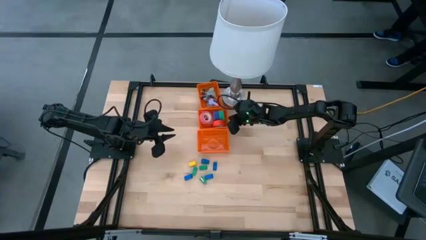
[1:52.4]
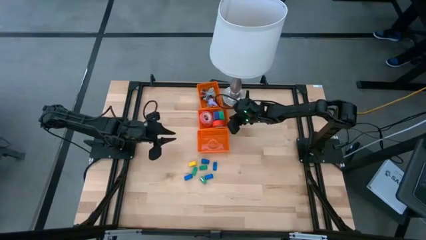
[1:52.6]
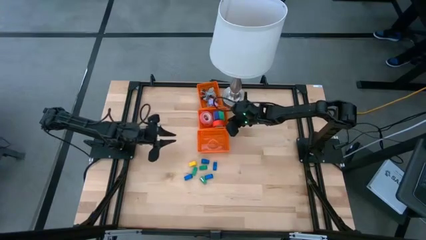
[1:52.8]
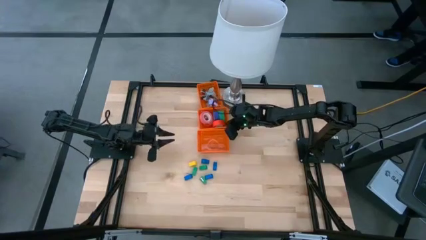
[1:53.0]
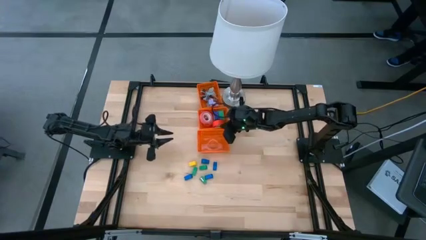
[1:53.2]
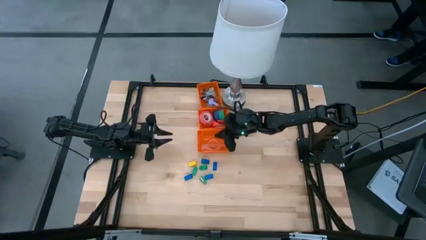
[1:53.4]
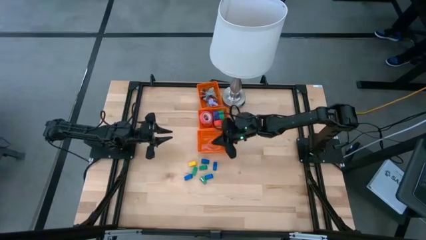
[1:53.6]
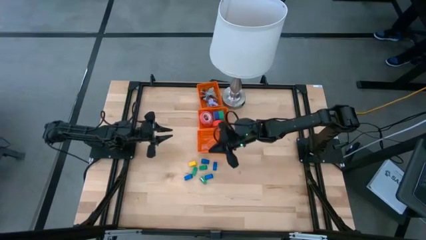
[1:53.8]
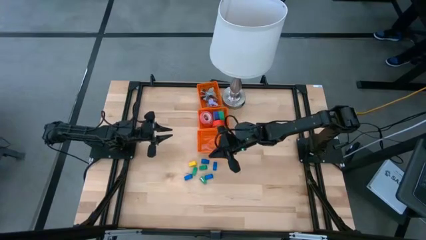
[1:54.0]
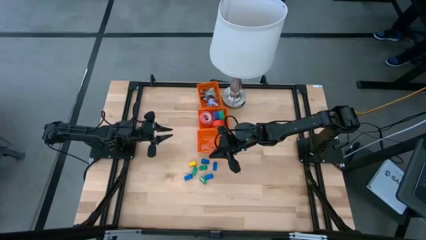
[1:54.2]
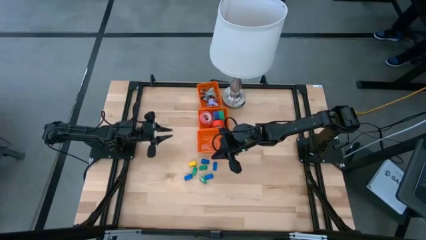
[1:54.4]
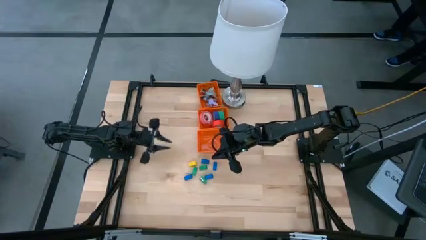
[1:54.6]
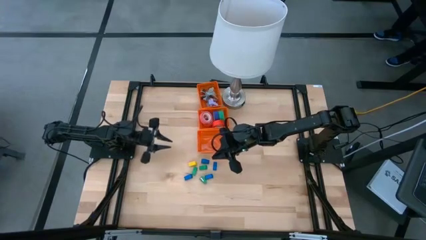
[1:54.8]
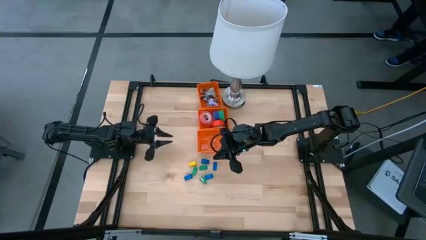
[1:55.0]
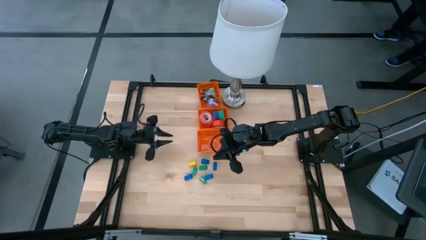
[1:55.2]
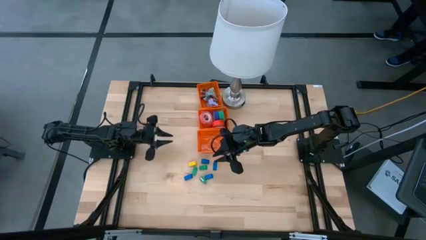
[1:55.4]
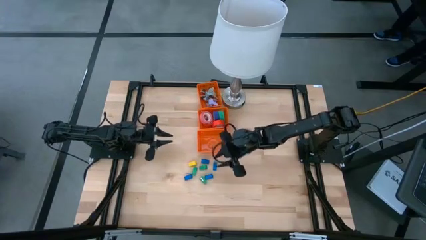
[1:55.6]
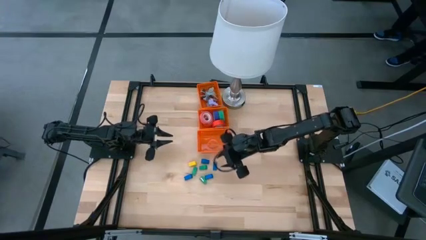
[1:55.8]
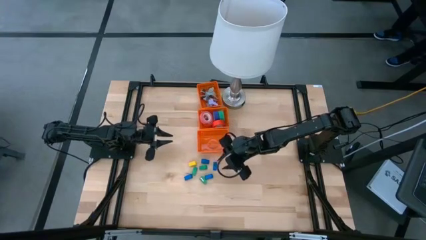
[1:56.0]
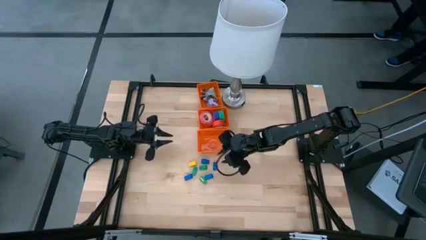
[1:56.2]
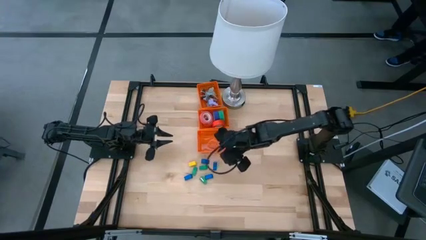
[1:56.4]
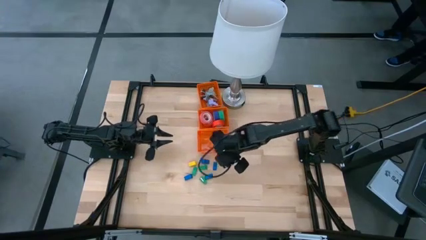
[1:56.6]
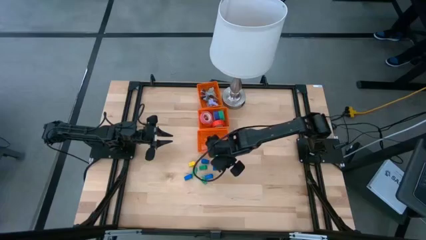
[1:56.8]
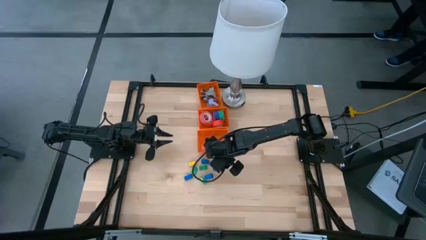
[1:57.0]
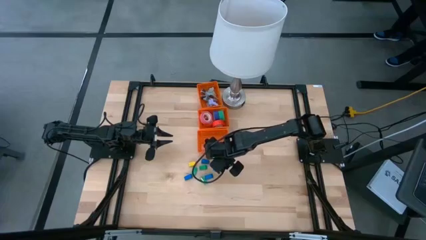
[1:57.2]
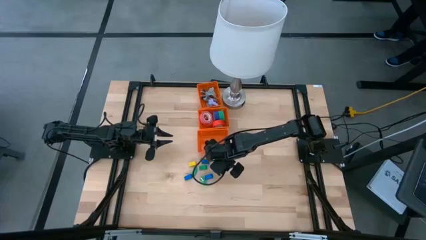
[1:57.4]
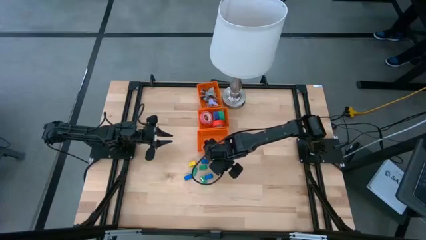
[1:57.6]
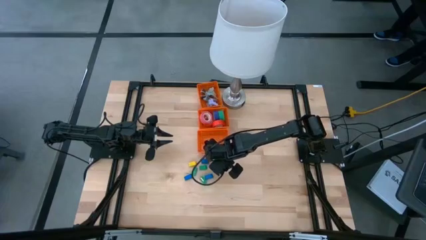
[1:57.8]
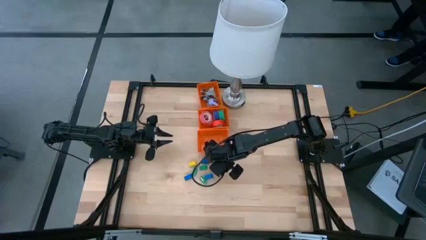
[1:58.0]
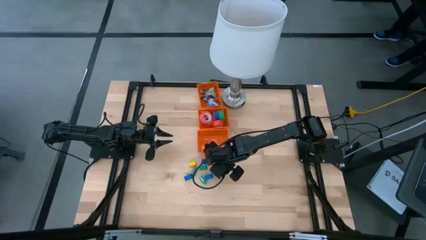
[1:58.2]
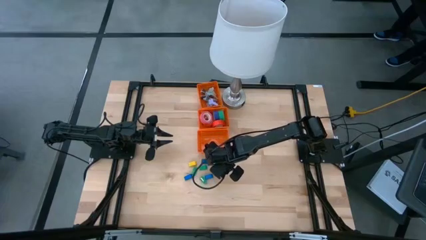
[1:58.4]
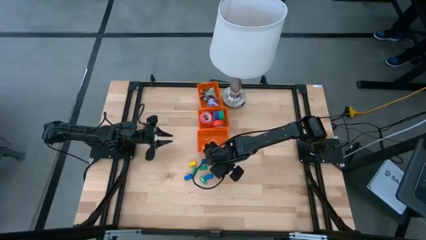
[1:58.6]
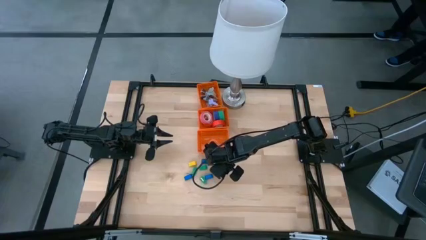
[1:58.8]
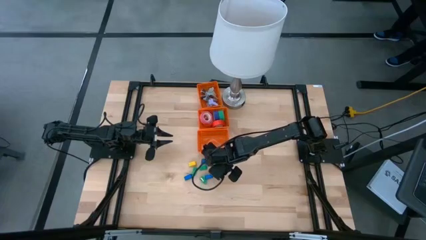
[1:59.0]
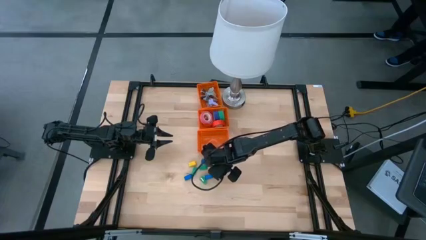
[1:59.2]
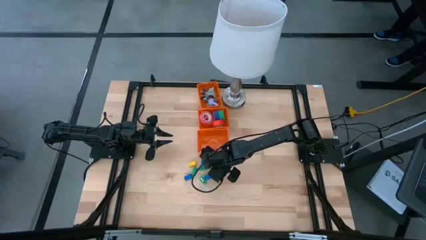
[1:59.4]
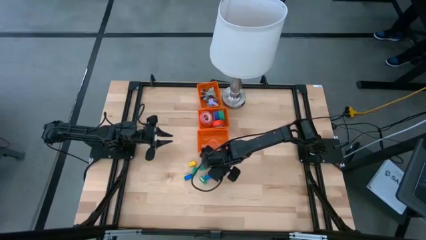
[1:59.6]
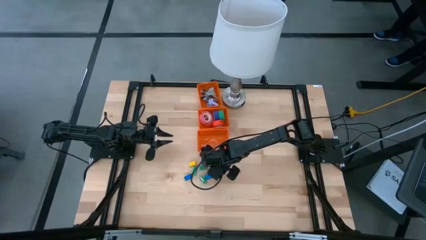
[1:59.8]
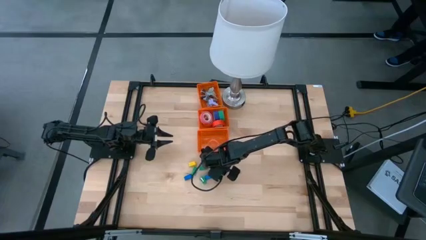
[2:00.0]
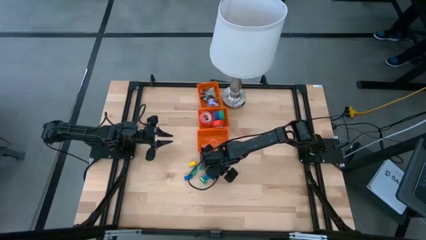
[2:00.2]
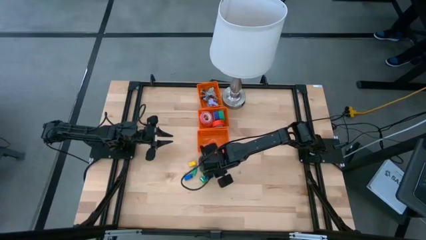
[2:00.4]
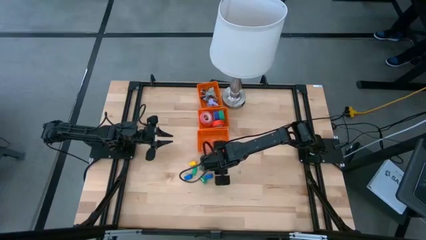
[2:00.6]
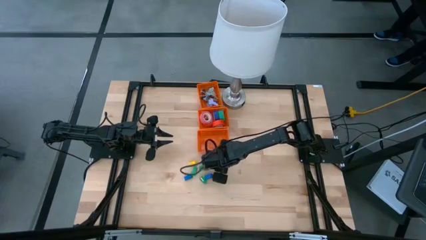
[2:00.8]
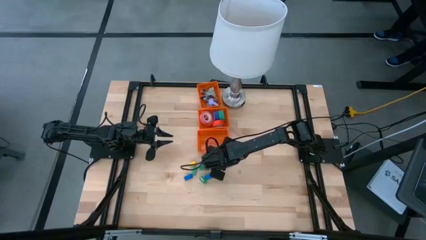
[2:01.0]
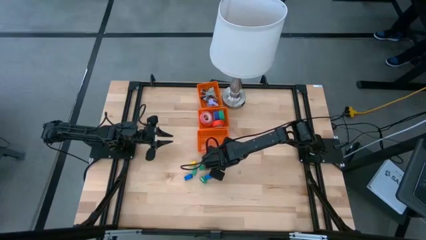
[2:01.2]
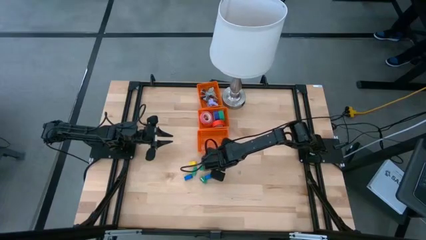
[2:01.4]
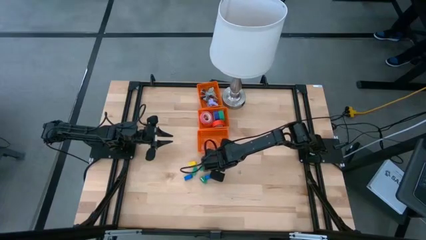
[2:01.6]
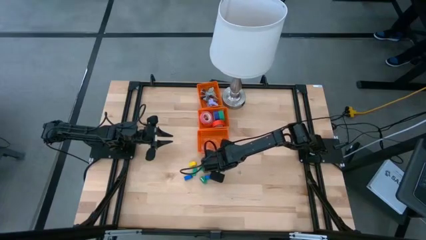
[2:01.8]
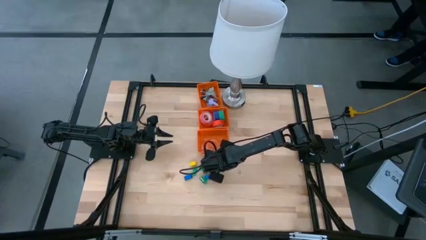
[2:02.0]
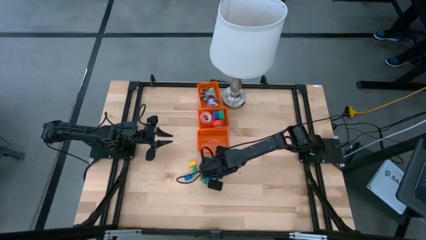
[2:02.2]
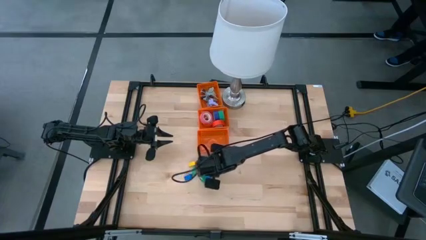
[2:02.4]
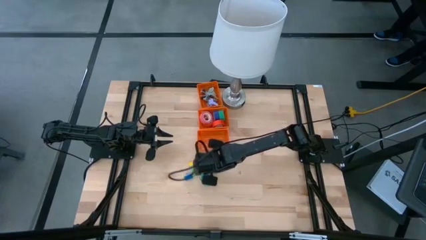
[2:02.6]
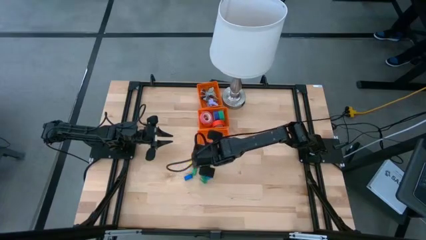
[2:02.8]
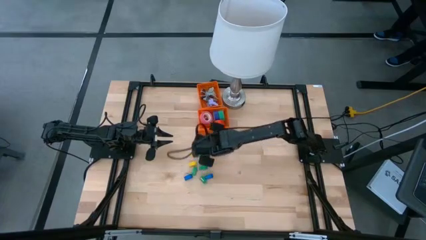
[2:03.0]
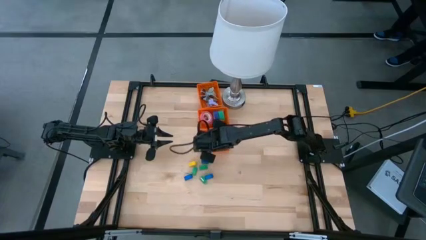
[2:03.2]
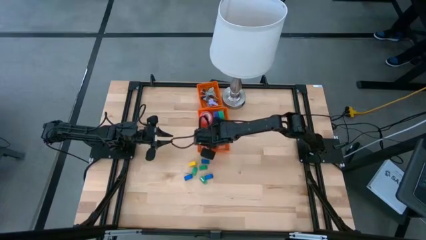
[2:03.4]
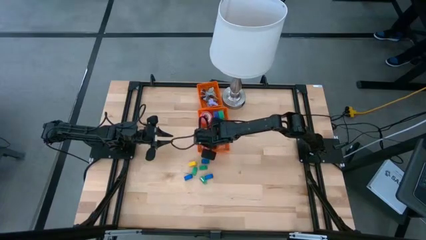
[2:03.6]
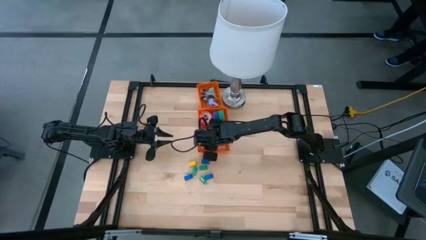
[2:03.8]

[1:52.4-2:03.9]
Task: Pick and place Stapler, Stapler remover, tape
Put the blue stapler into the bottom orange basket

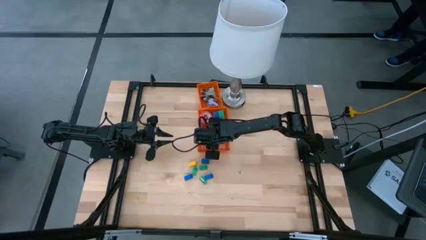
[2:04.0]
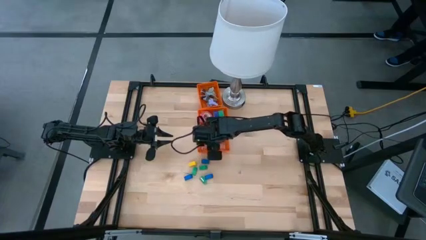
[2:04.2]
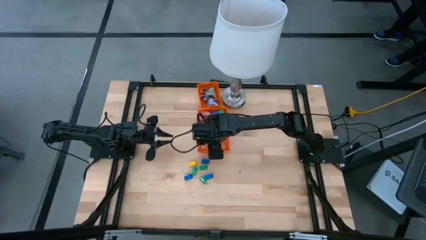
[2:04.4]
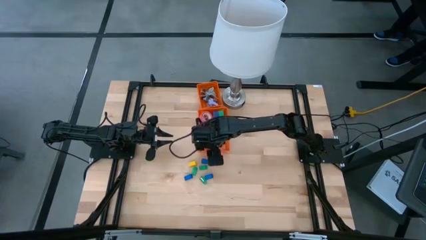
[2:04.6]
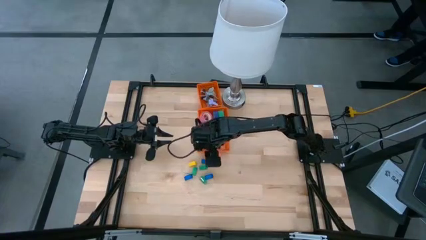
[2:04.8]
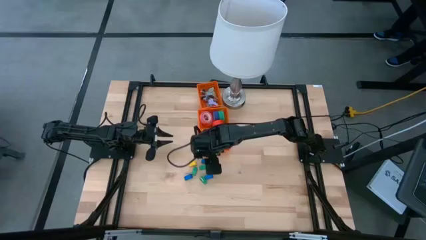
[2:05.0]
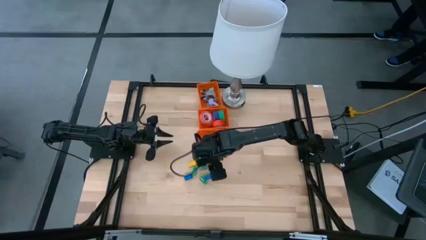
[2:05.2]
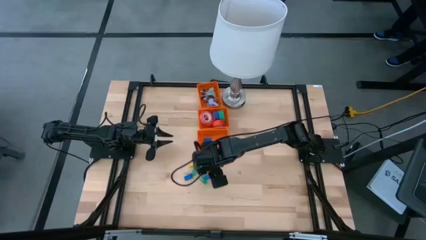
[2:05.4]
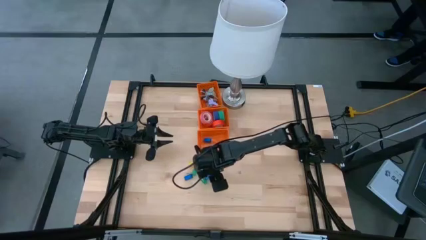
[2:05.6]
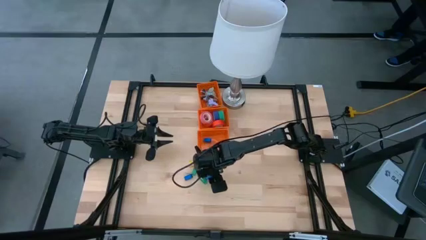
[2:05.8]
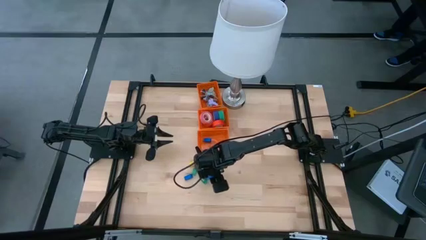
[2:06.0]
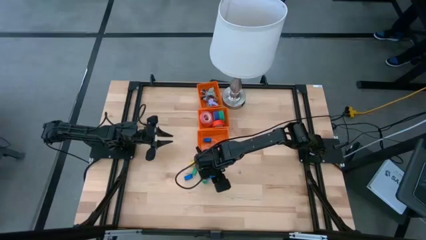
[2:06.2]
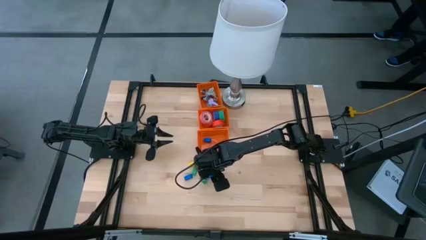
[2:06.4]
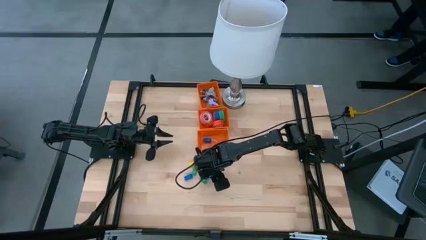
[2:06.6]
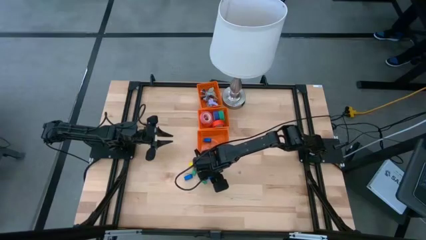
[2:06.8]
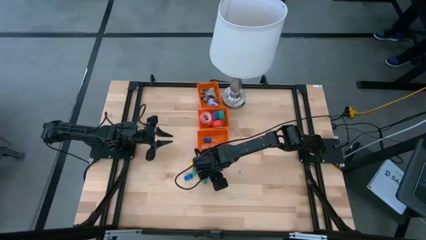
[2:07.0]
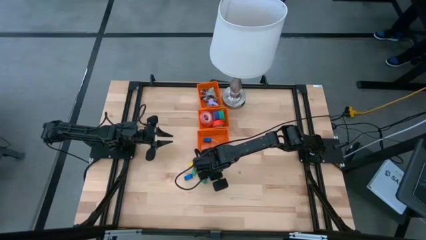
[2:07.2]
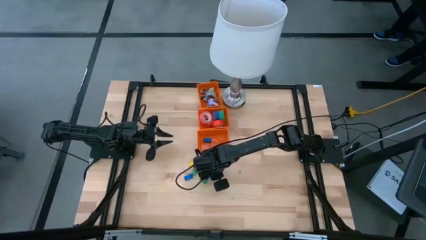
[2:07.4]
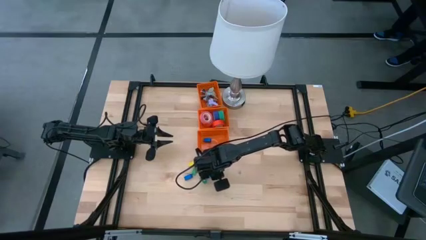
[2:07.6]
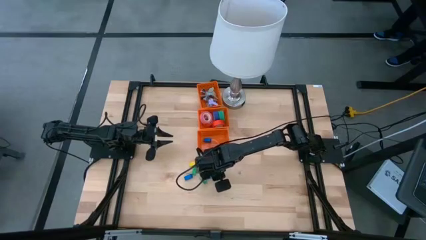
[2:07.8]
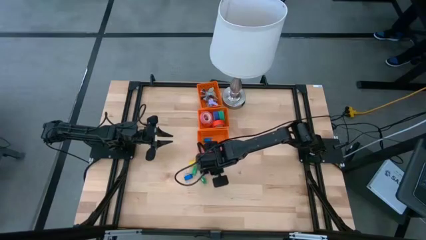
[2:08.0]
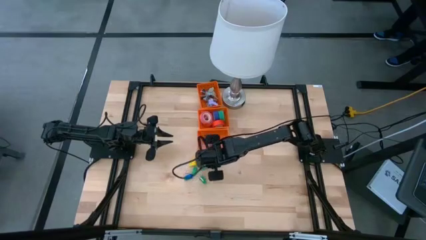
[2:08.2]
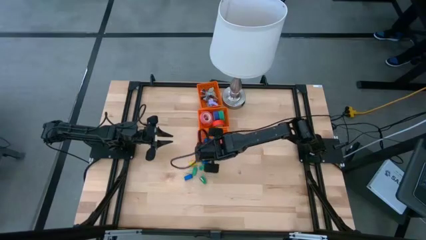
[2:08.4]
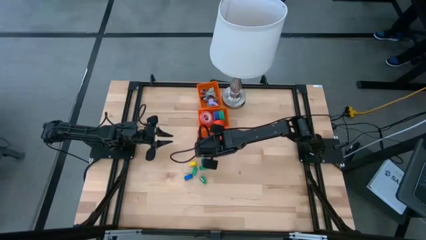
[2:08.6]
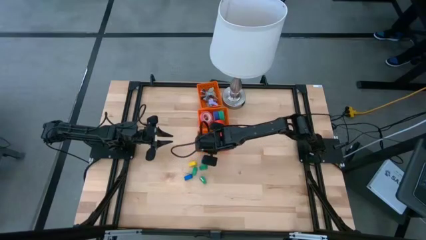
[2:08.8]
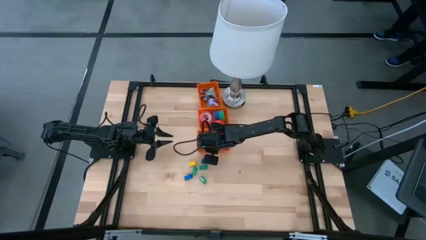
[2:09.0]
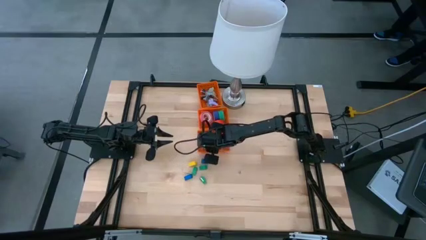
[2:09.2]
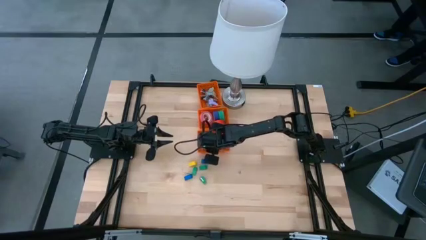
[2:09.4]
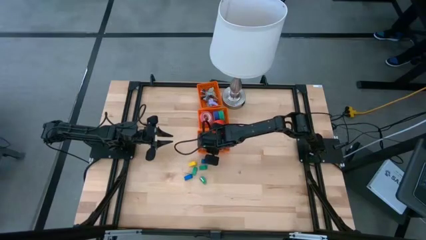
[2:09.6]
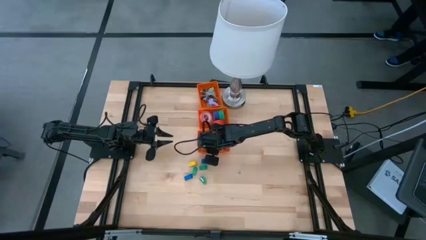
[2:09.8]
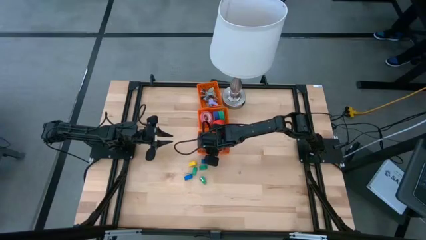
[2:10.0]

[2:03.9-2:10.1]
Put the blue stapler into the bottom orange basket
